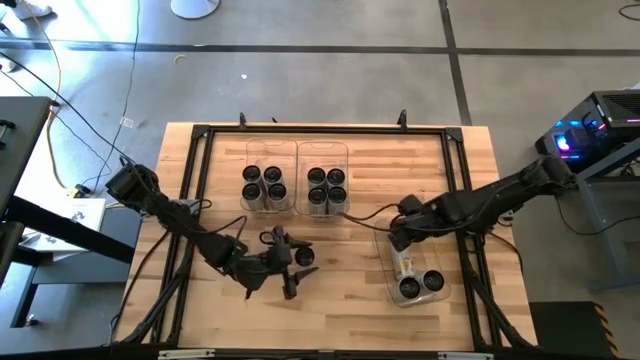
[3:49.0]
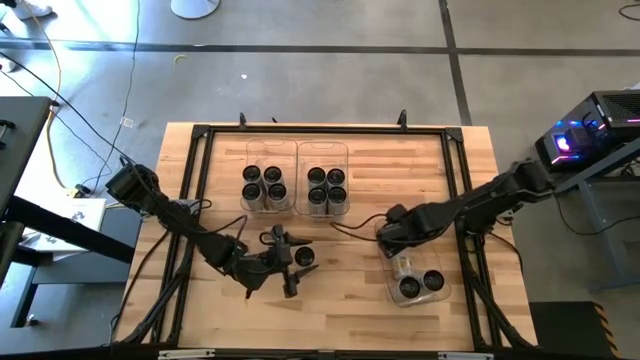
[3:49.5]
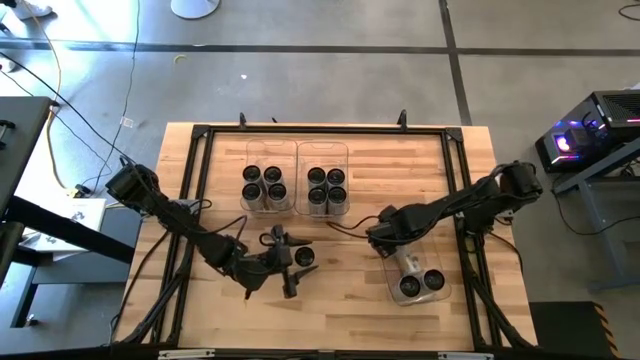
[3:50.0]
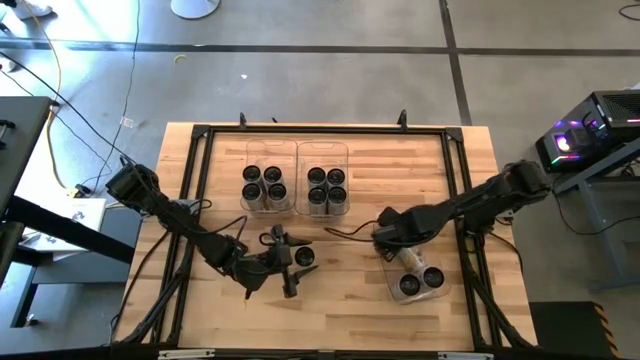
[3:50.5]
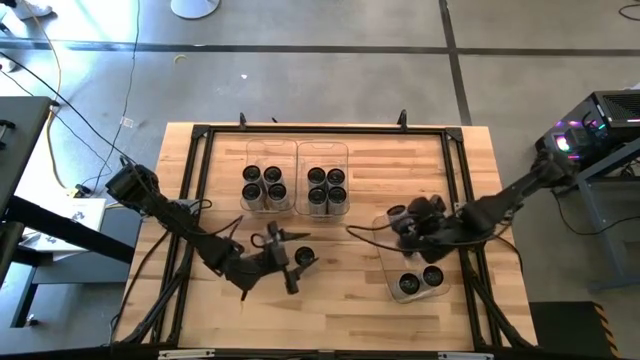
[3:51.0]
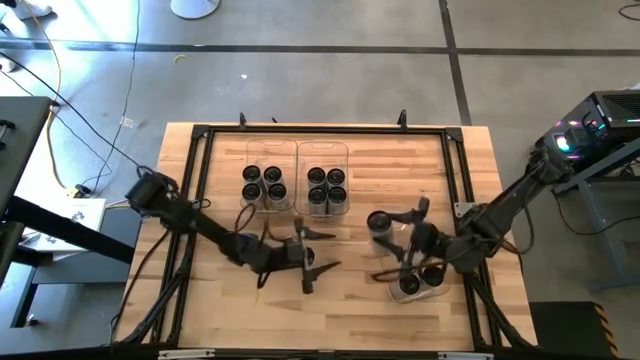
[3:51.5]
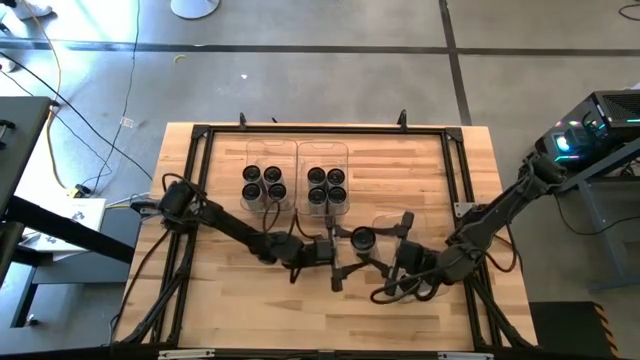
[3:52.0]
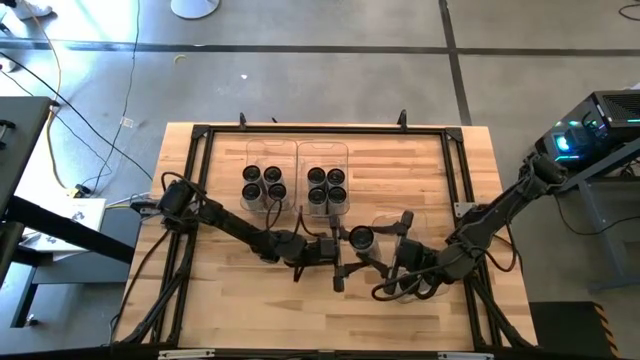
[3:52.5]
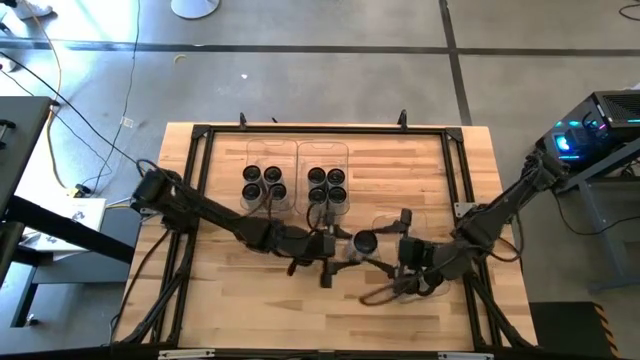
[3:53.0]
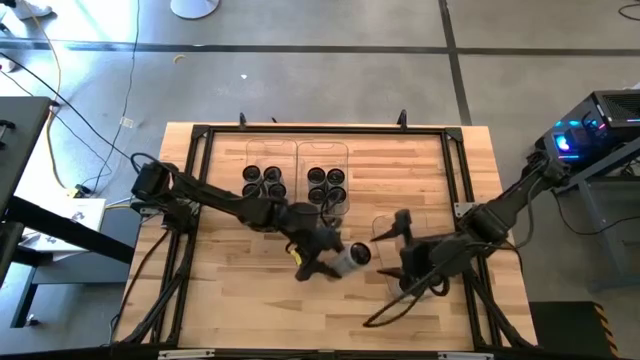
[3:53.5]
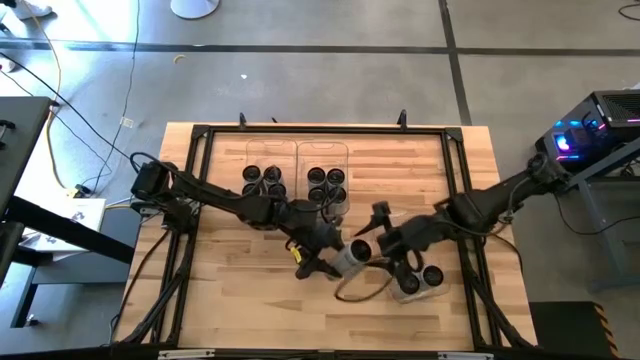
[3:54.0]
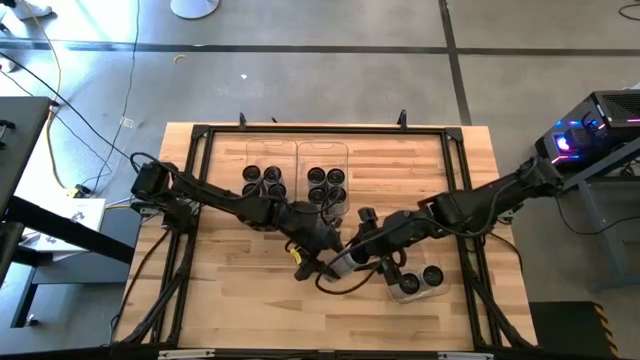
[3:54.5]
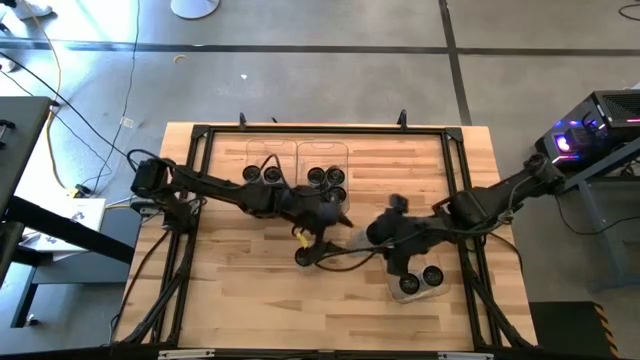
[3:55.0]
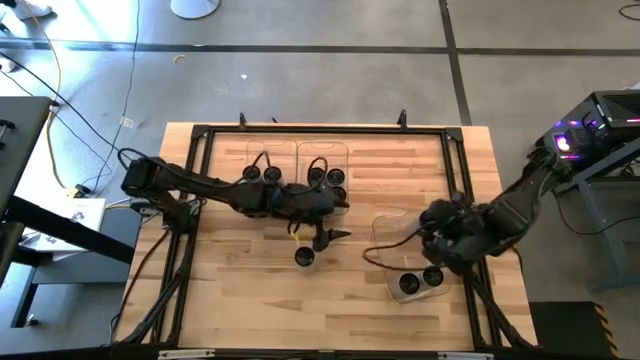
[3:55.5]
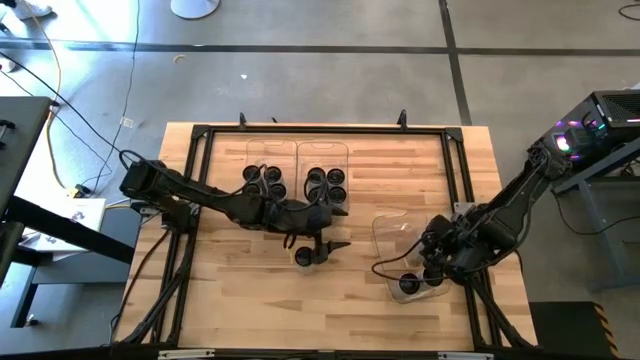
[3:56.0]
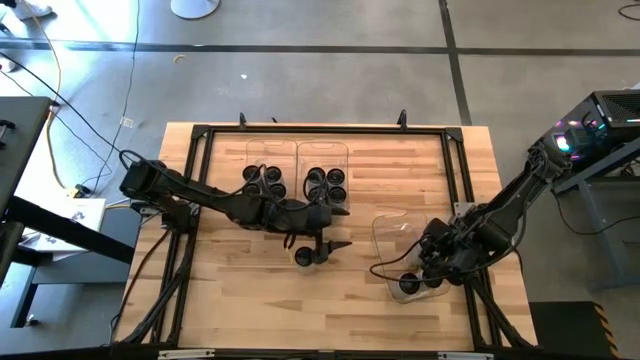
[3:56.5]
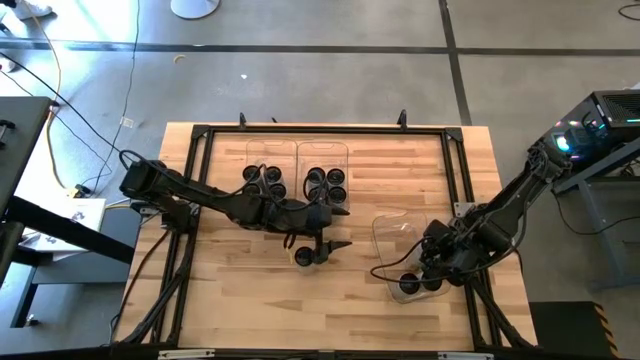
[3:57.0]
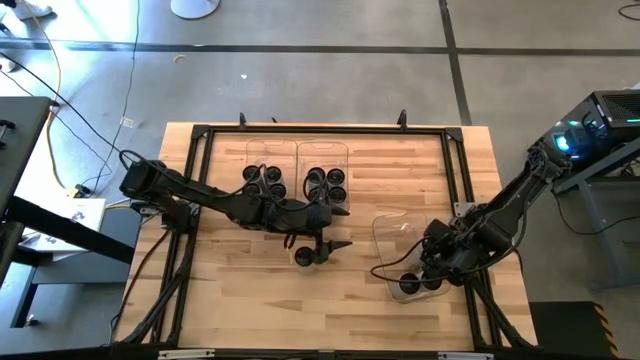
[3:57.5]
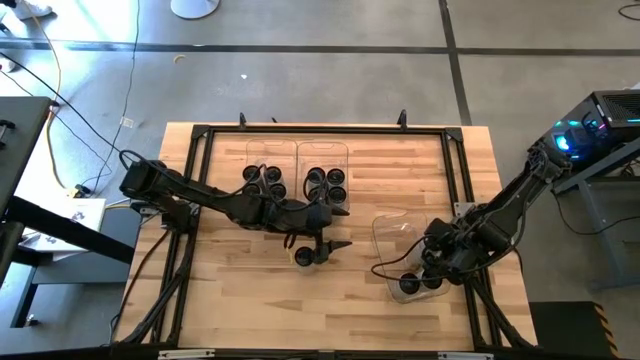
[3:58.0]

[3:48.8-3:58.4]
Task: Sort soda cans
Adjust the white-yellow soda can

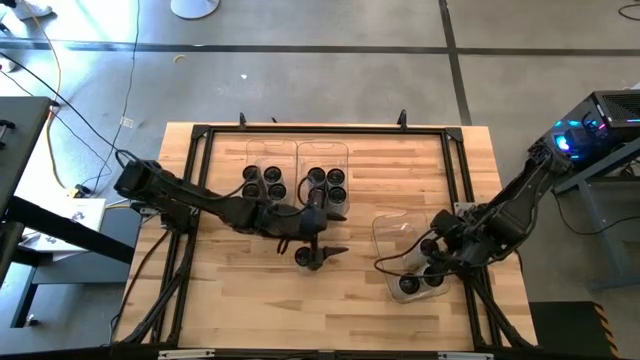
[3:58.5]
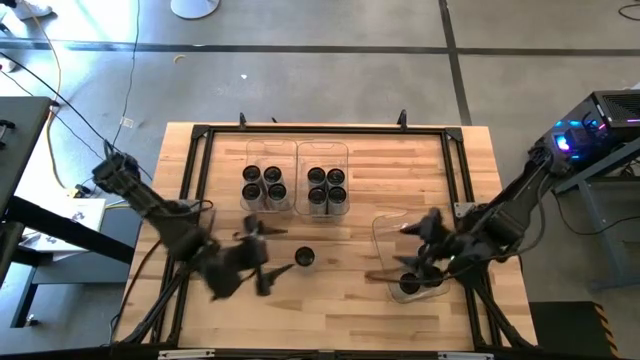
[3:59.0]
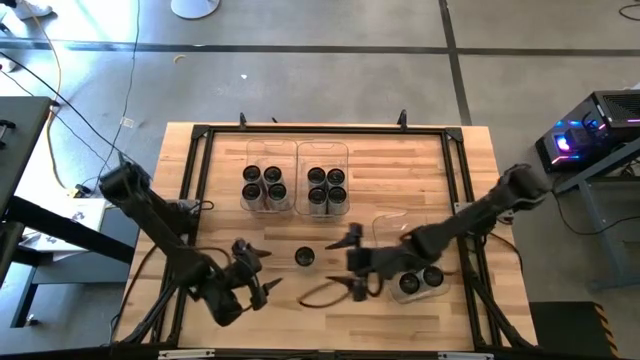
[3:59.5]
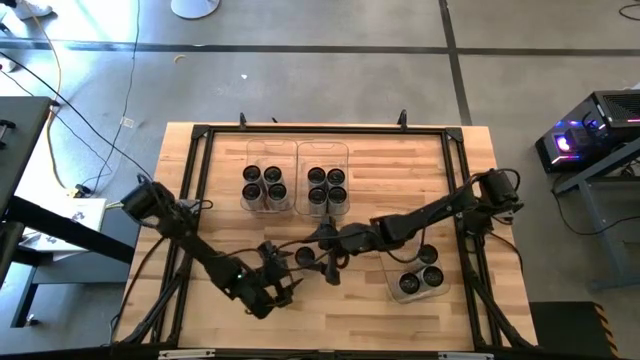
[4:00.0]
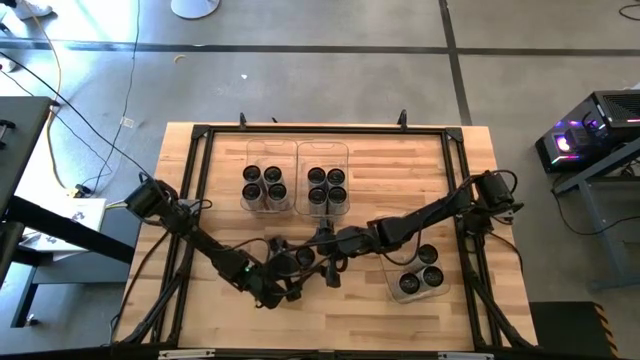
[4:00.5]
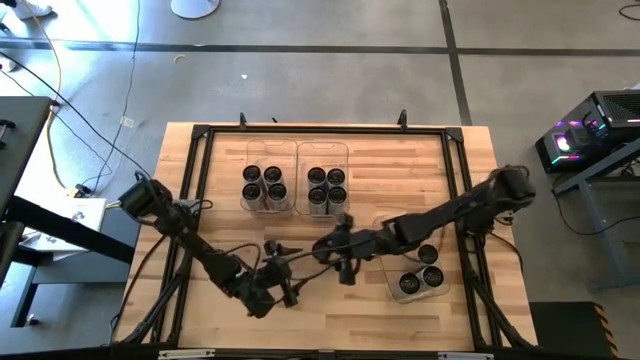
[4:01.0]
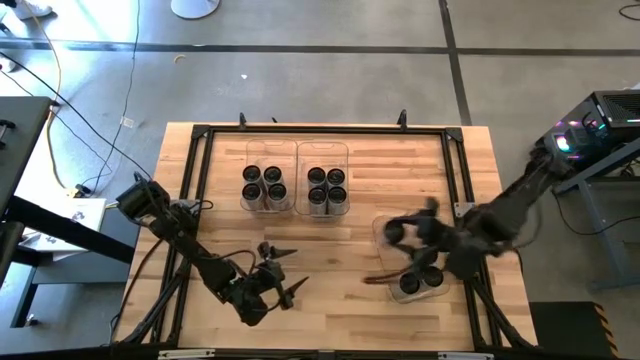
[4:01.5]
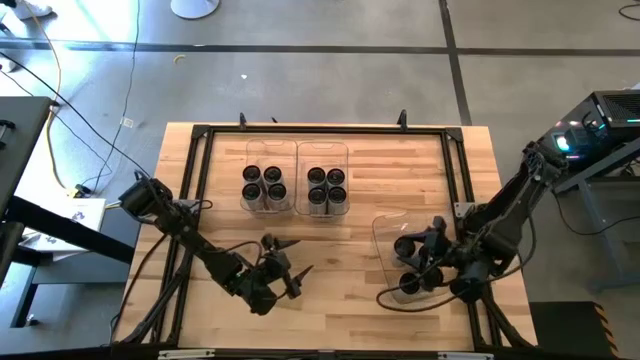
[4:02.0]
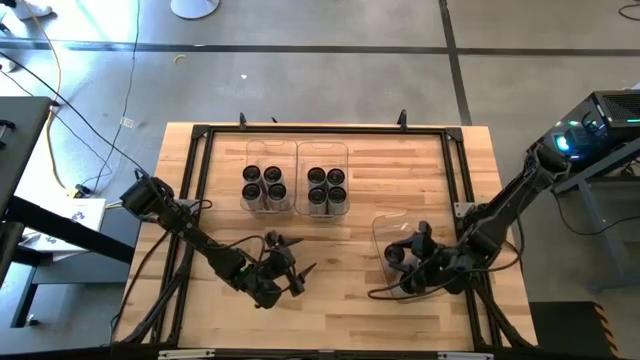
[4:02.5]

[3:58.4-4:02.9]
Put the white-yellow soda can into the bottom transparent bin

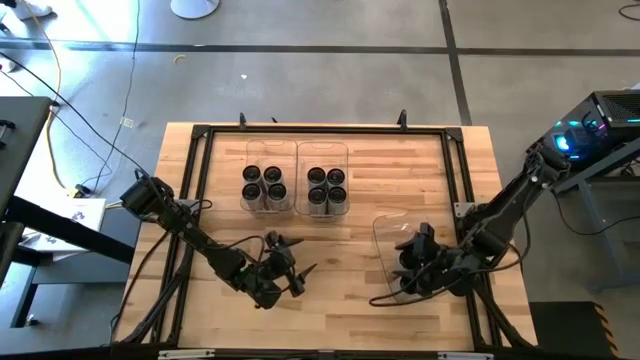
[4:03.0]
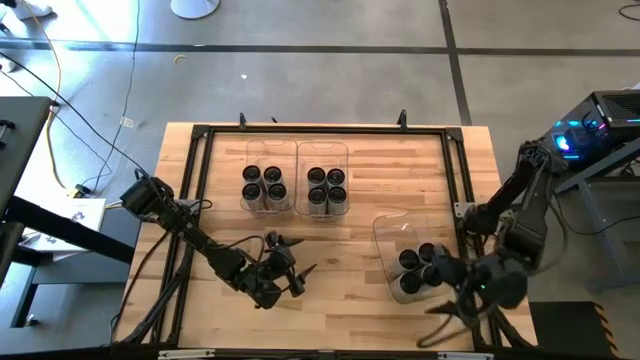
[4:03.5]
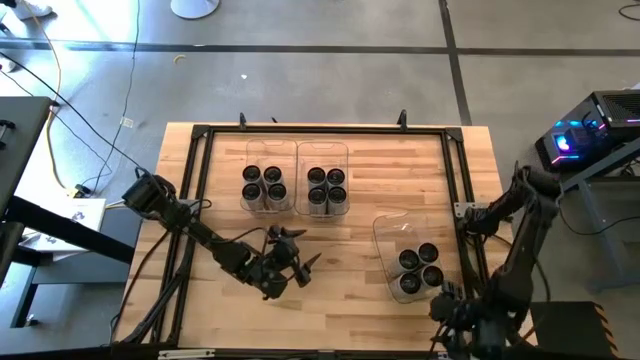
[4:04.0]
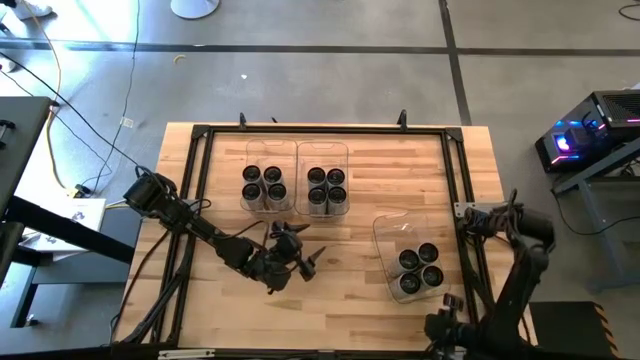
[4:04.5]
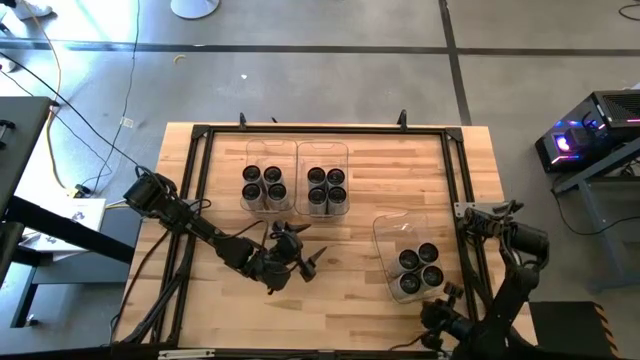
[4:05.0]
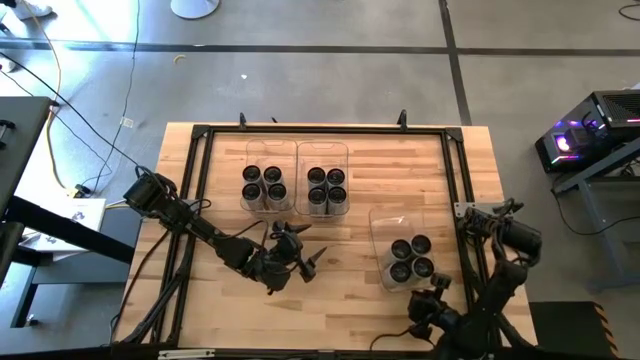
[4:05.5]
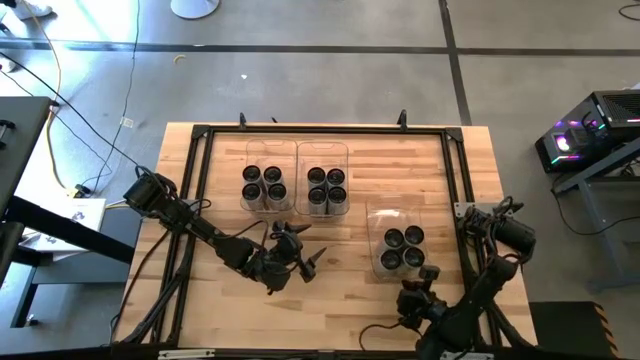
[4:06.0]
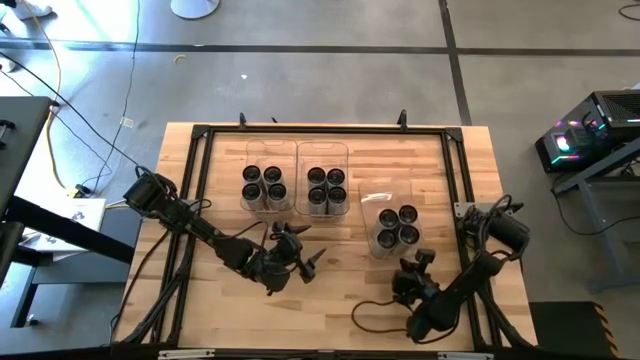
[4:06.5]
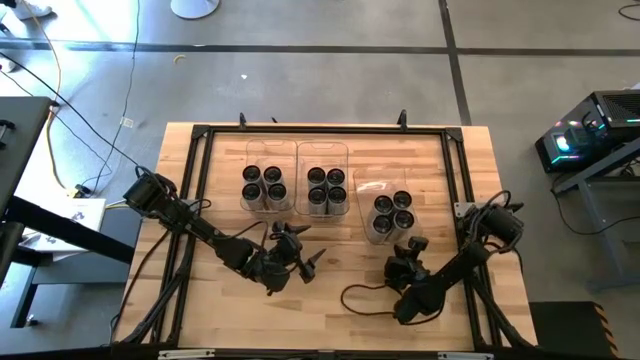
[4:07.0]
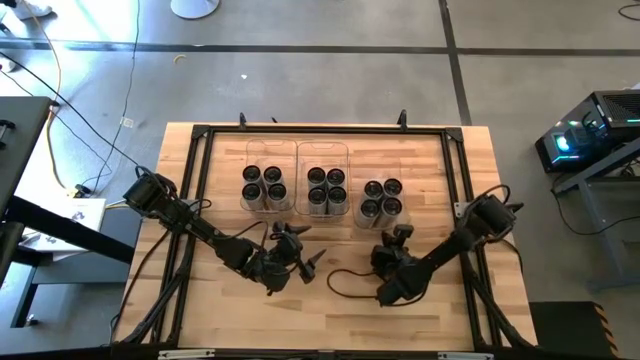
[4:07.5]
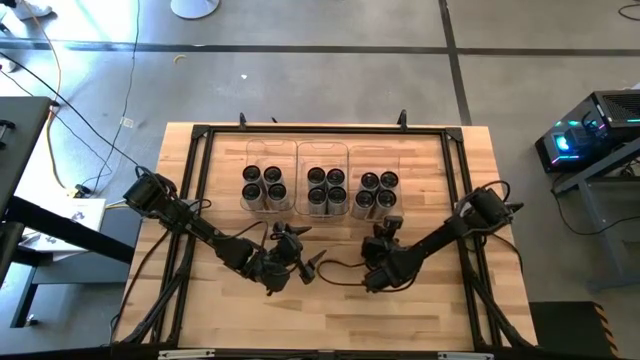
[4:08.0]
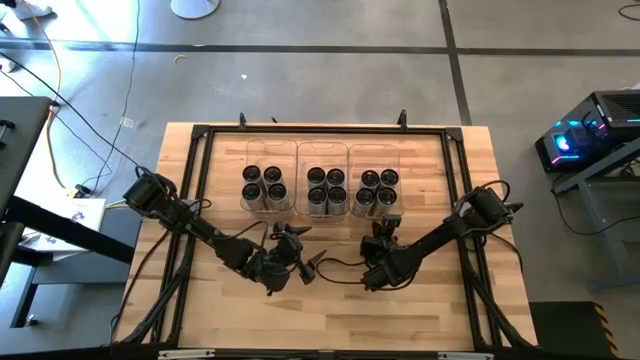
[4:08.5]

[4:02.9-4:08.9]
Move the bottom transparent bin to the top right of the table

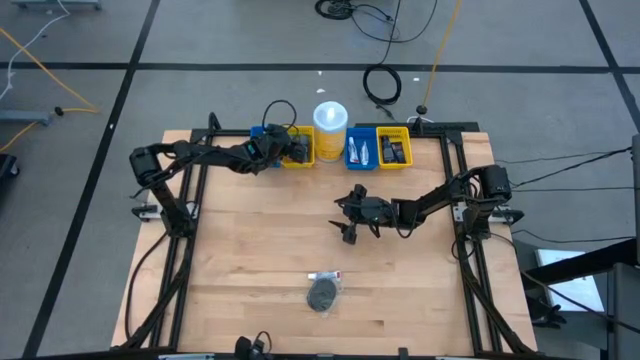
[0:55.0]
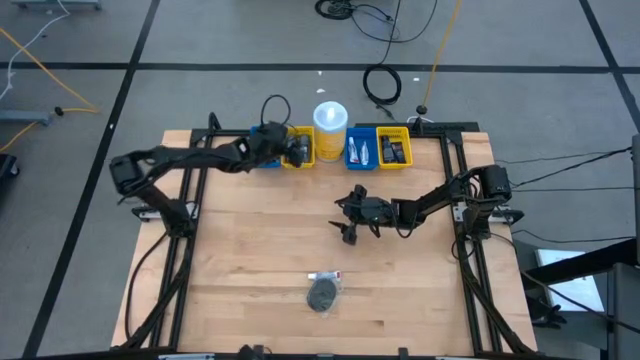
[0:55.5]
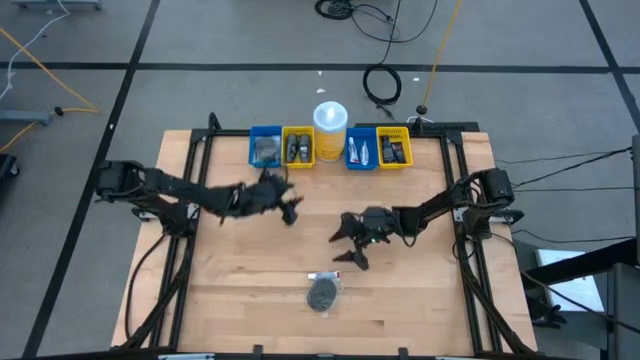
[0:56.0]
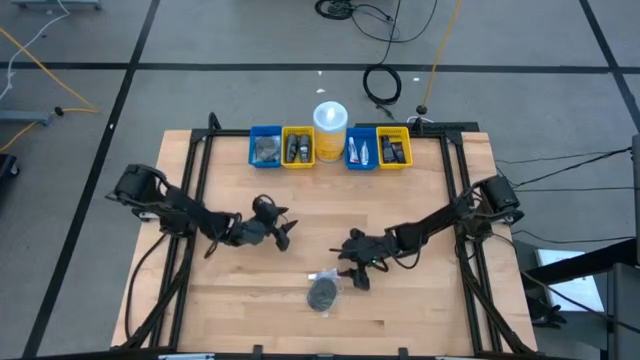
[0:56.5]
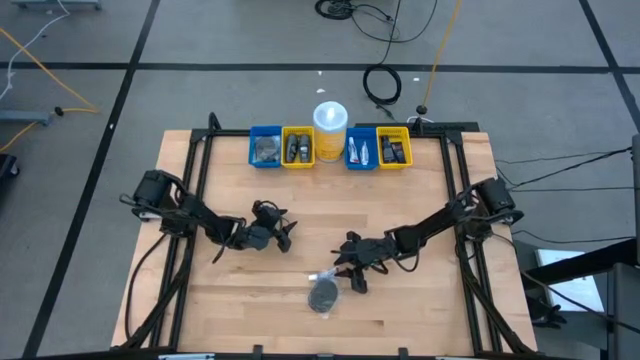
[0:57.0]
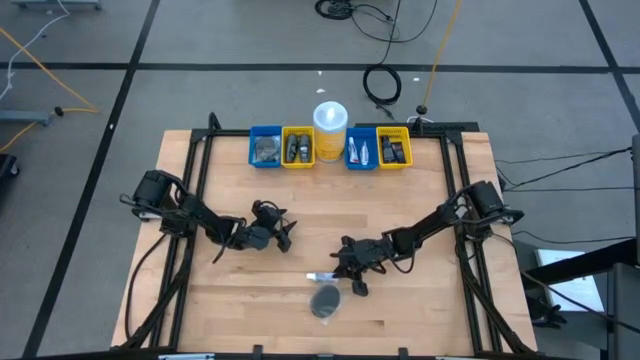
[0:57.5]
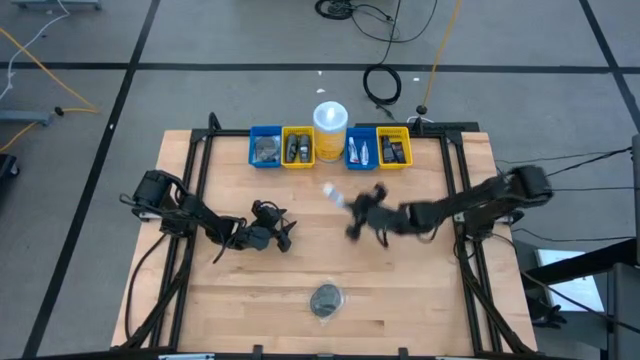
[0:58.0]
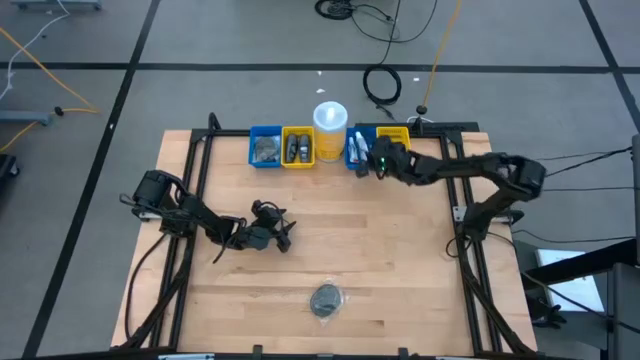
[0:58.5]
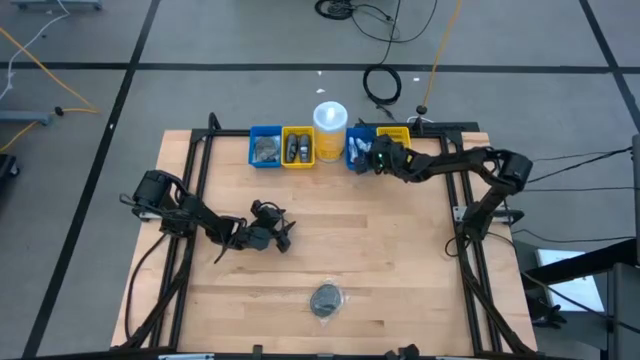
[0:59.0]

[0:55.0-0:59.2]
Task: Pick & Place Travel size toiletries
Put the white toothpaste into the right blue bin
